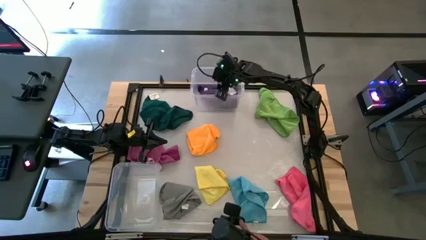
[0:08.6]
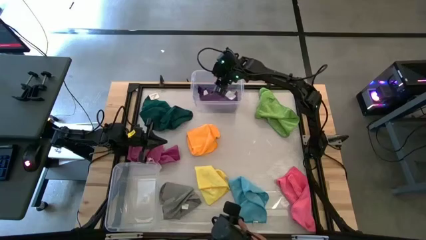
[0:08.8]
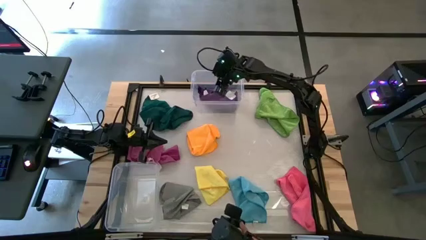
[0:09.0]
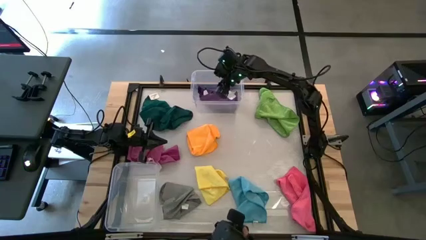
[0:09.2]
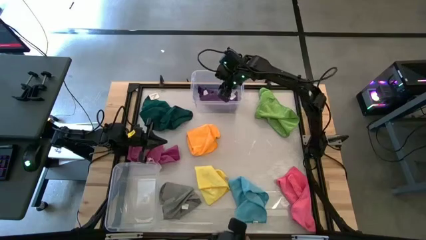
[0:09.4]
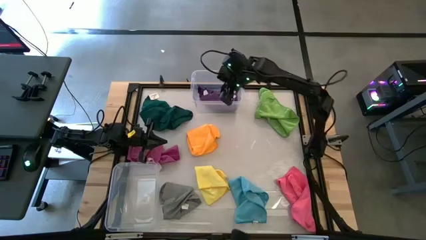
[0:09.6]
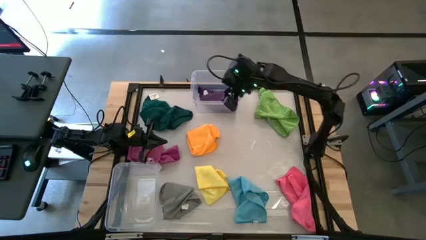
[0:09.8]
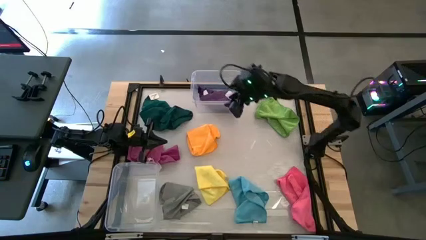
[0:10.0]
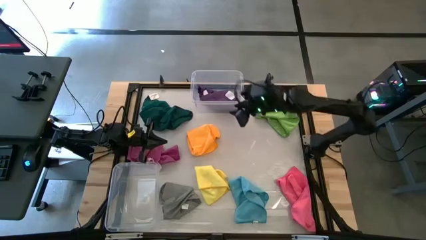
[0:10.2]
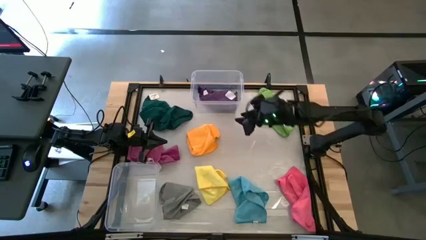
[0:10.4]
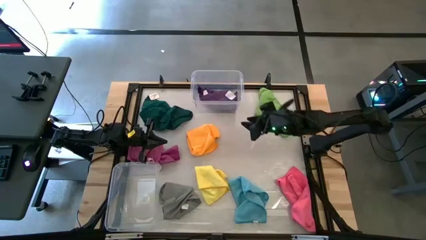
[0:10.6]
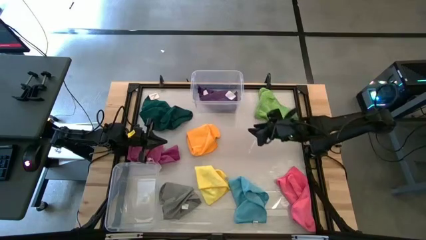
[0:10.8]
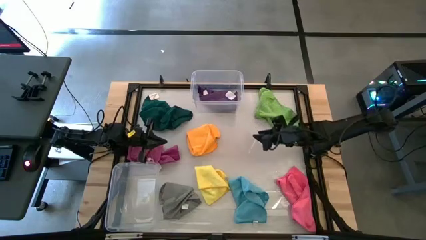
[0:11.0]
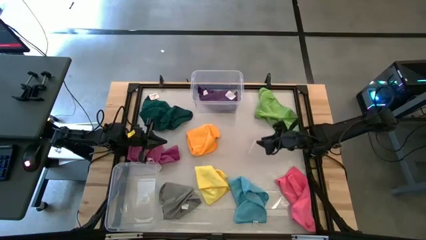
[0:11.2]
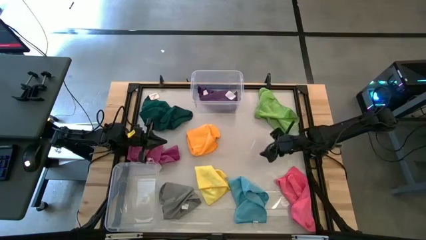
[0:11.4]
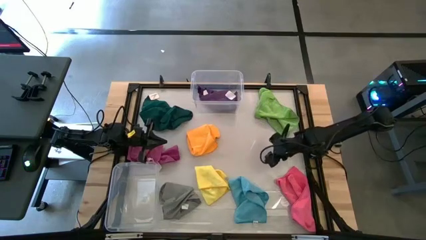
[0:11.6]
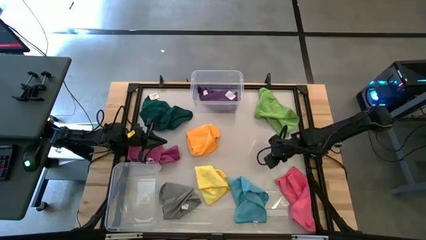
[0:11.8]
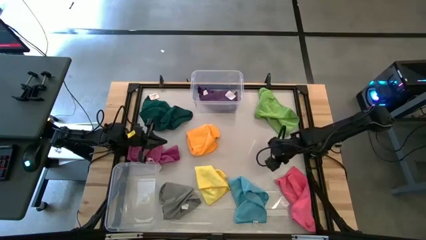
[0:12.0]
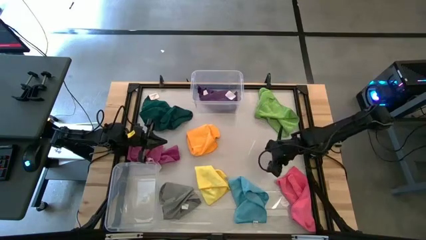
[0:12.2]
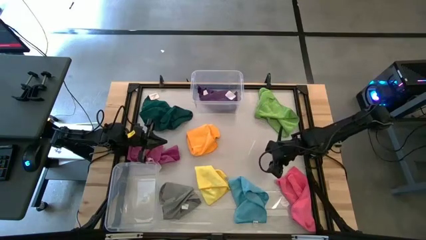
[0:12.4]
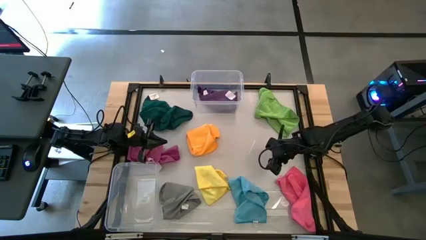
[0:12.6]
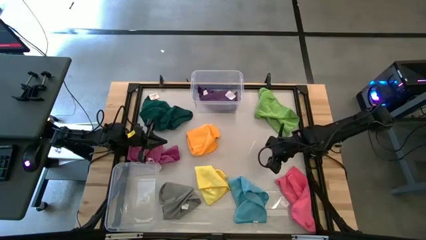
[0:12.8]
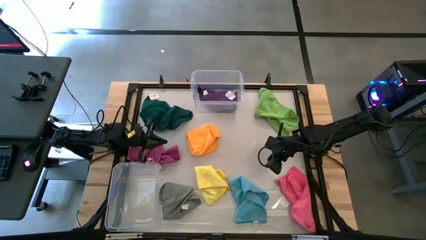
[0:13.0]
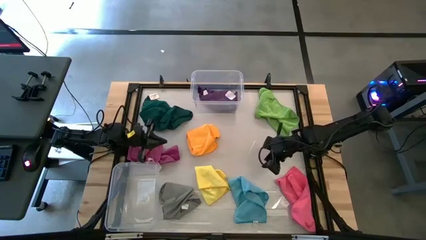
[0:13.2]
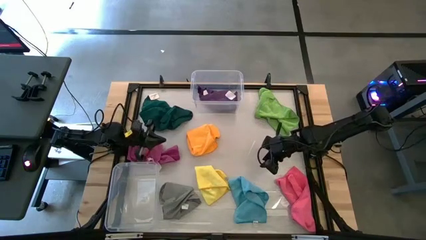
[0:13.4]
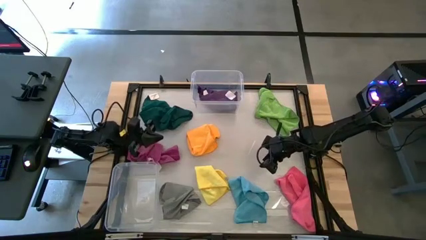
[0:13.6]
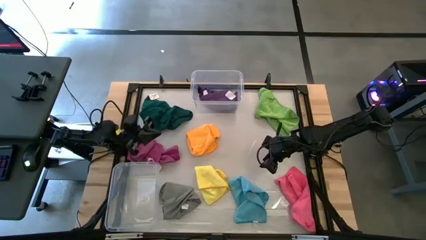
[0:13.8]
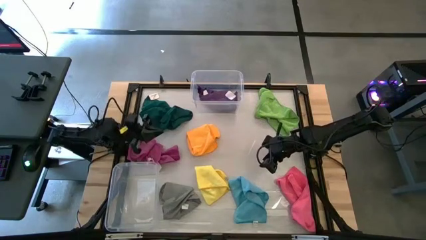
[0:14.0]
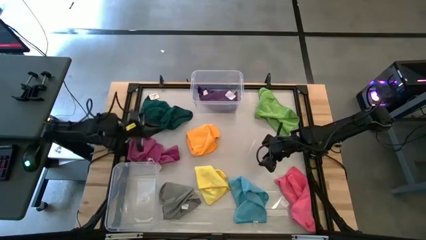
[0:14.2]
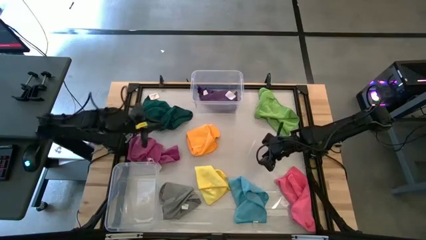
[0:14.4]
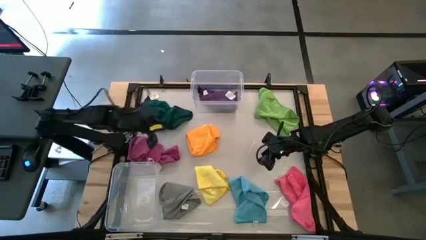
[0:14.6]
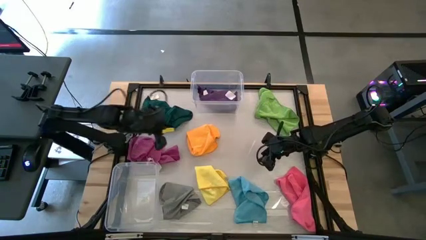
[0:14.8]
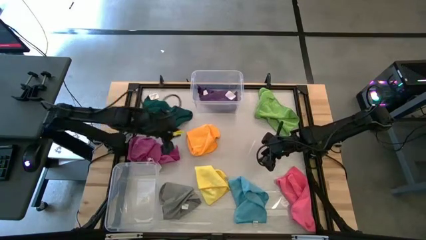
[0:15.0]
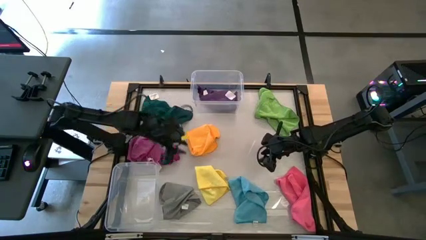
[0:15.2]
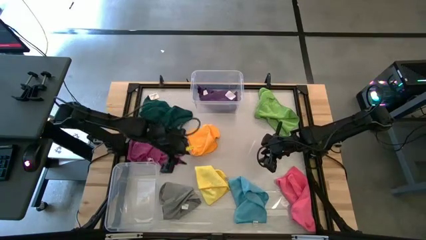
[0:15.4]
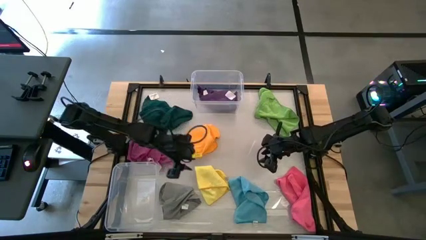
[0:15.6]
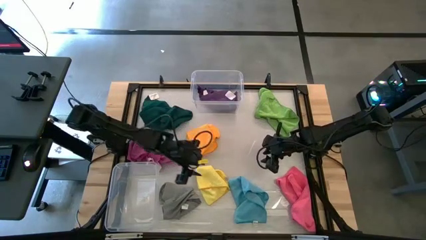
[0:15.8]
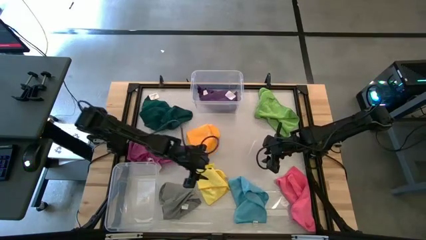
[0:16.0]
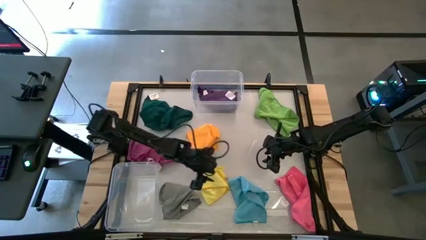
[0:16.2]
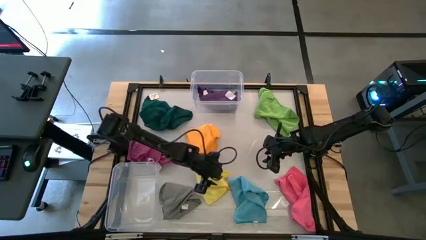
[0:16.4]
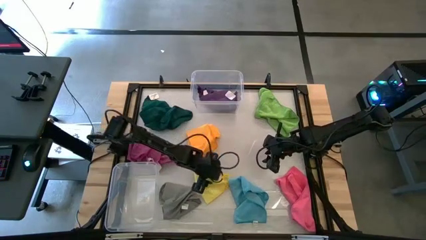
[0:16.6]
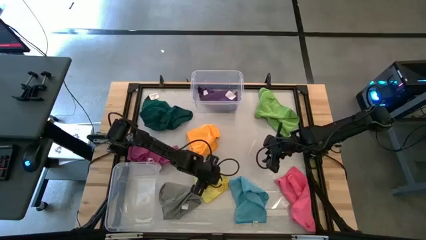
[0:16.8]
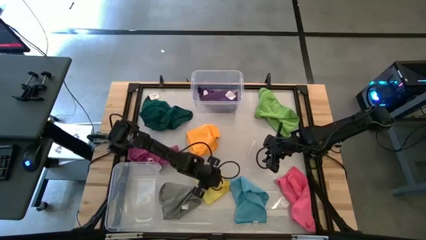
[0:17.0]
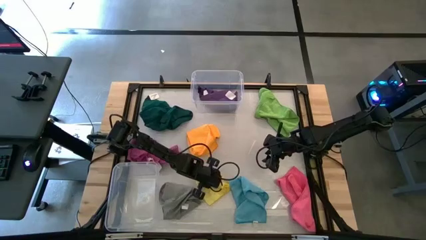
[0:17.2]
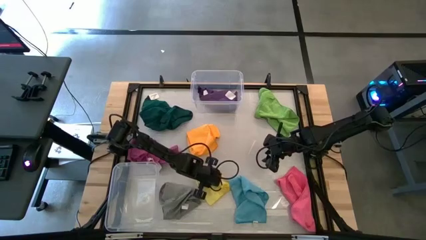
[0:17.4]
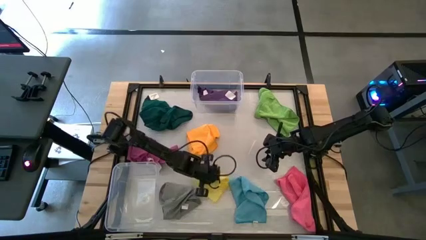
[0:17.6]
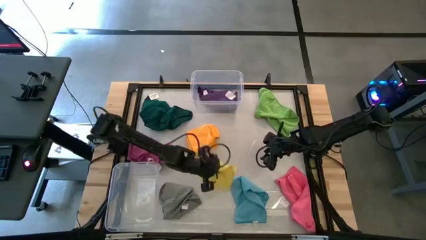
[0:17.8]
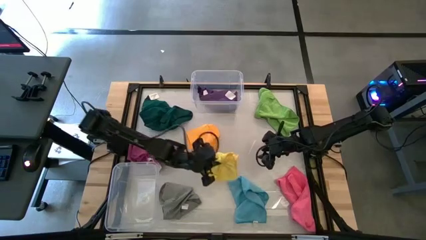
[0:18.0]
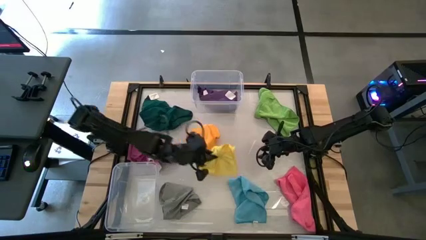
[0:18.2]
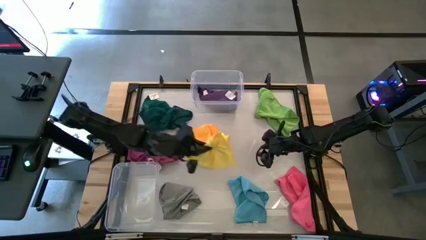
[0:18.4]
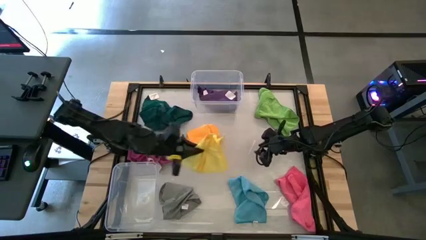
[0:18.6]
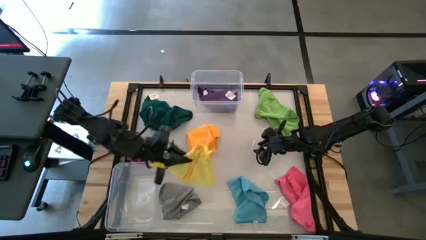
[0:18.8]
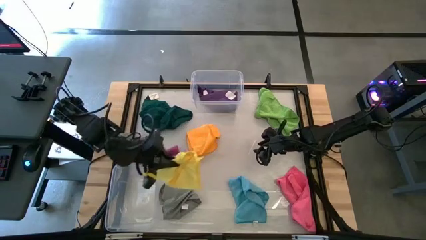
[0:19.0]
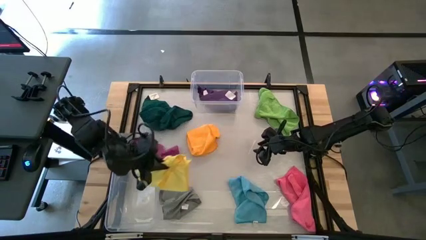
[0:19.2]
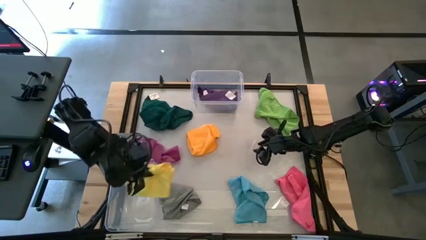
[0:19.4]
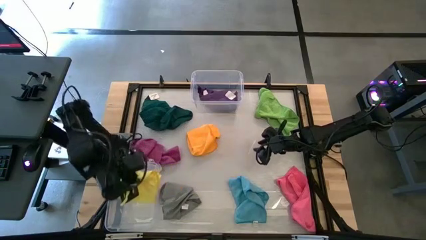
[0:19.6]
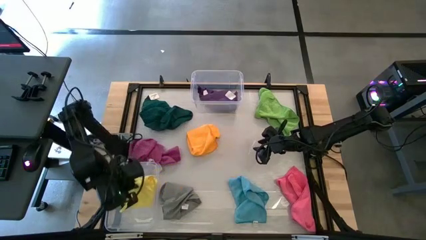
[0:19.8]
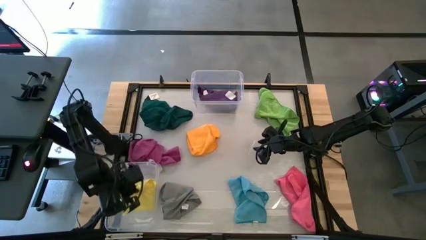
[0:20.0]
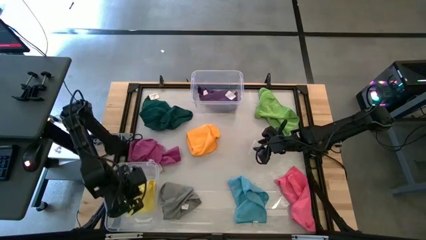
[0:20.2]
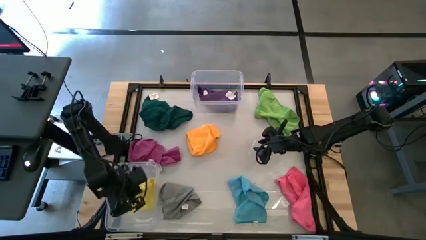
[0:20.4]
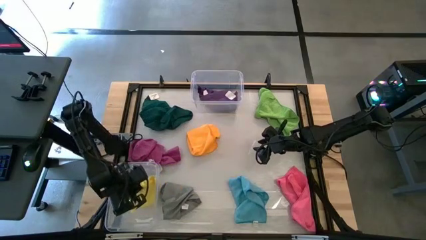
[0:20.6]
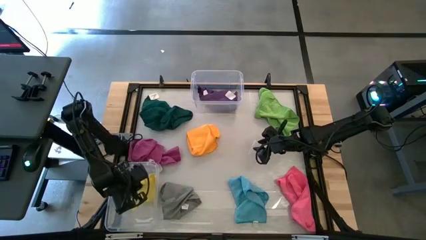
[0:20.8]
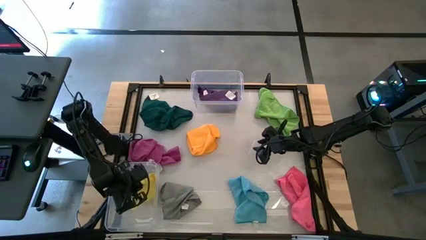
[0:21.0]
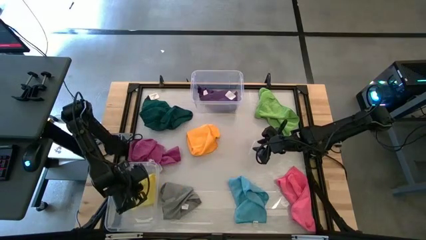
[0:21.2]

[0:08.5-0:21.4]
Task: Sort towels by color in basket
Put the yellow microfiber towel into the bottom transparent bin

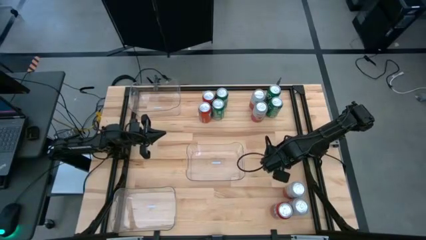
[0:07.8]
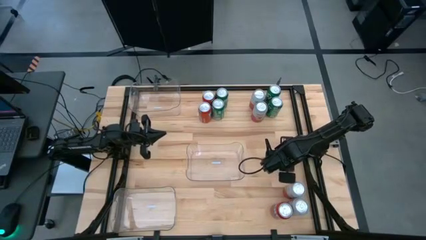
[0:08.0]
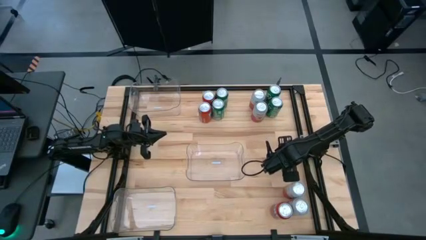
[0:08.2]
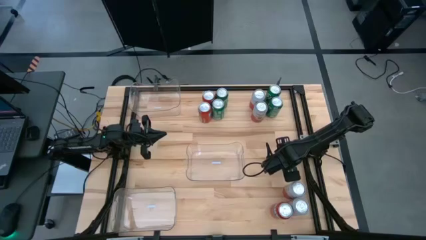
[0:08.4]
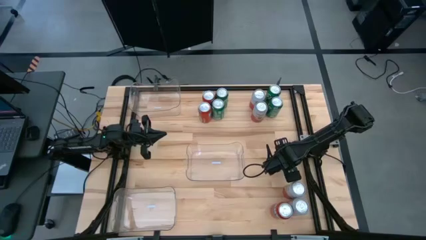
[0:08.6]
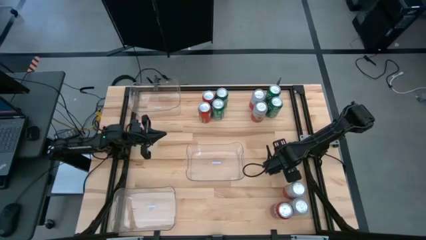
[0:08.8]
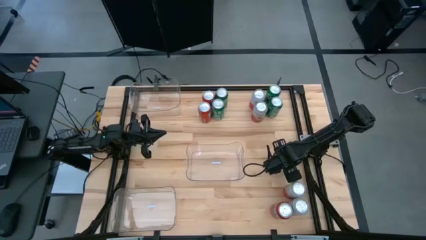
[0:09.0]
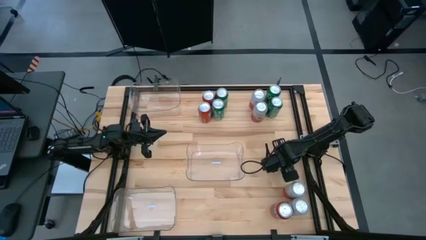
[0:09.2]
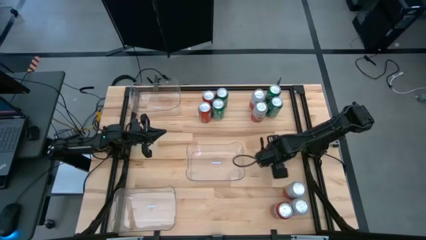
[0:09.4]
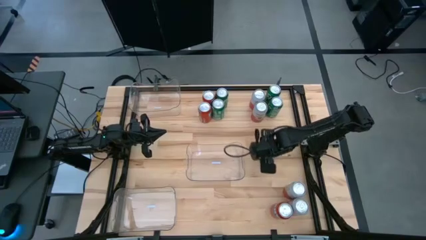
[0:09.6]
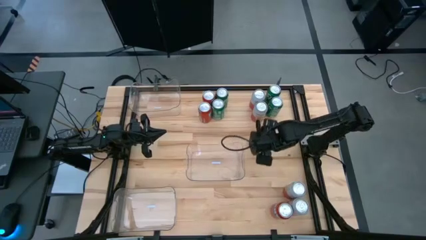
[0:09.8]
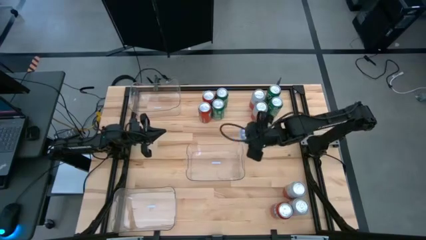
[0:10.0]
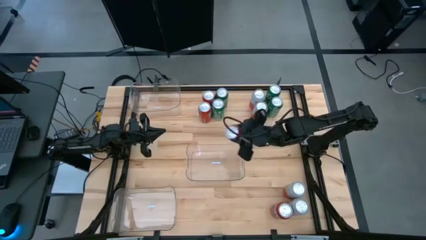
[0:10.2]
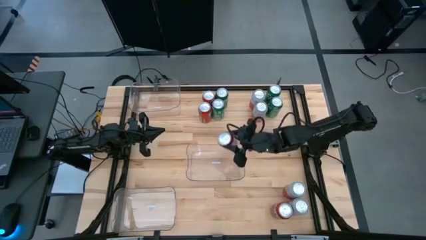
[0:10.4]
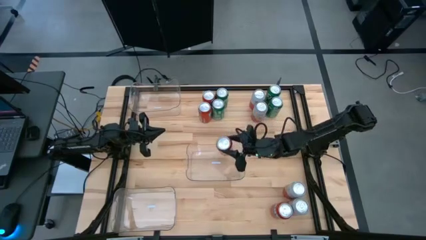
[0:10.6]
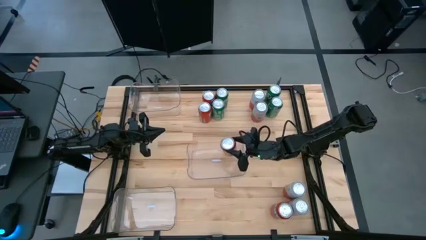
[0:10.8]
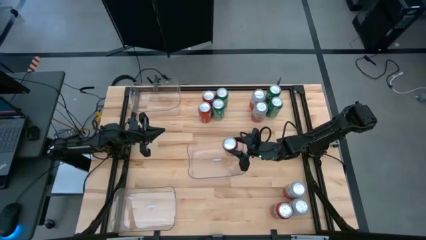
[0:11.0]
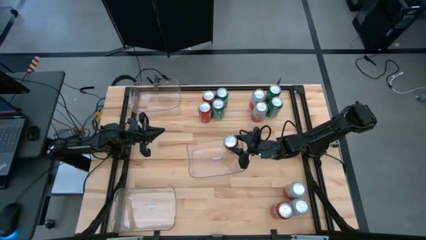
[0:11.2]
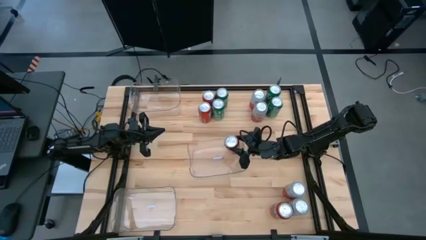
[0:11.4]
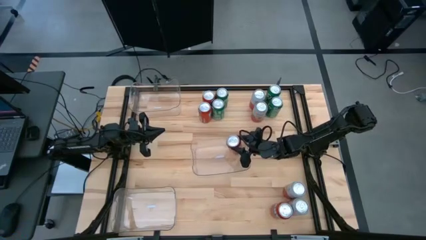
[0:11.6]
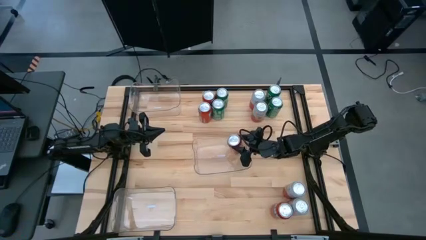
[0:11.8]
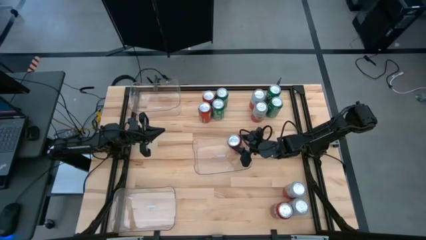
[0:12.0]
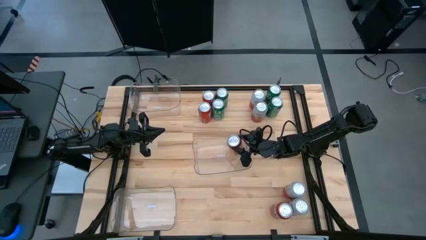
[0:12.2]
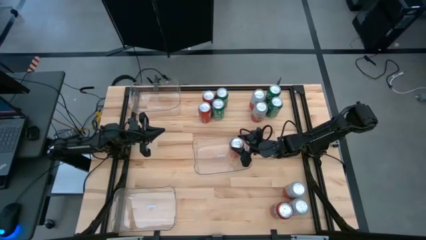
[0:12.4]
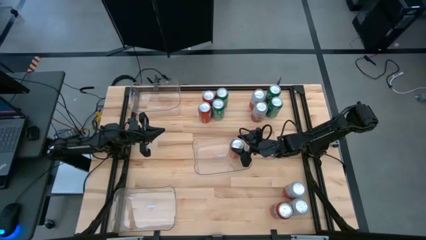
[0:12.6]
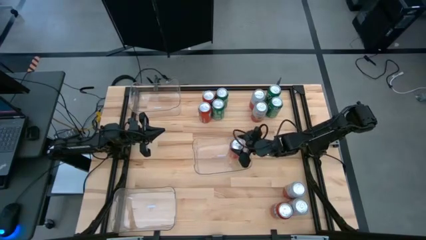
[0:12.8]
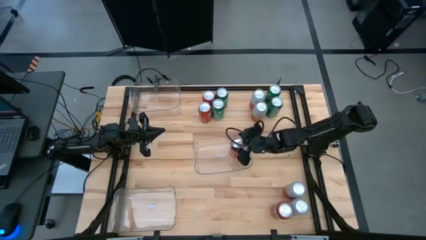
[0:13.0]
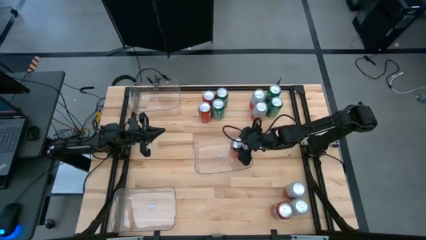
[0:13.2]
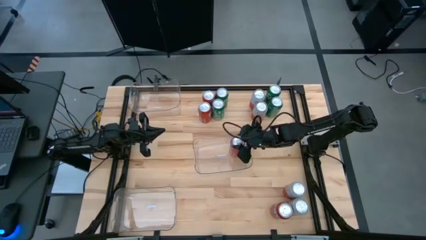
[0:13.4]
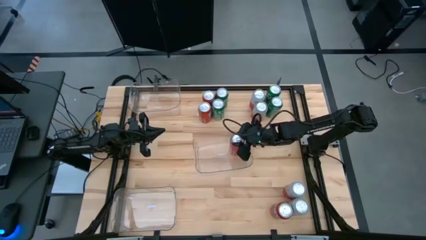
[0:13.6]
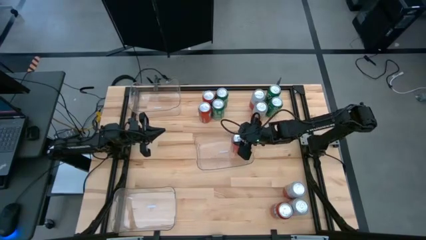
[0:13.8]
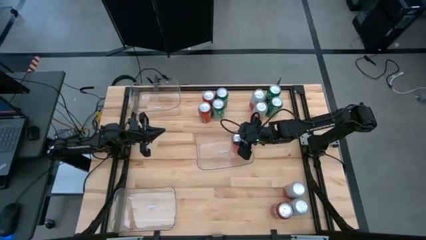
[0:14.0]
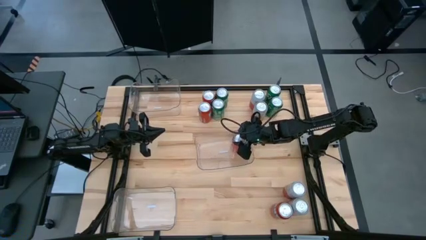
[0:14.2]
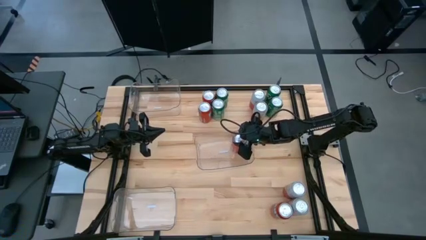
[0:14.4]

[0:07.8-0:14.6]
Task: Sort soda cans
Put the orange soda can into the middle transparent bin
